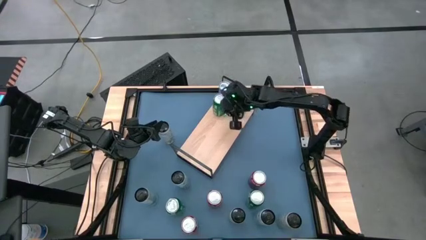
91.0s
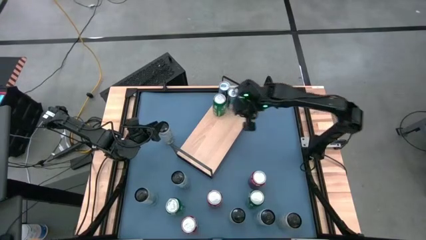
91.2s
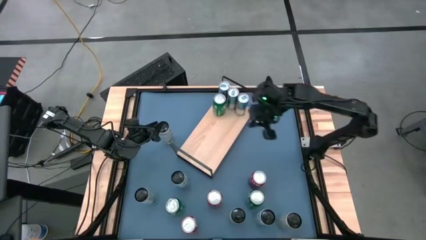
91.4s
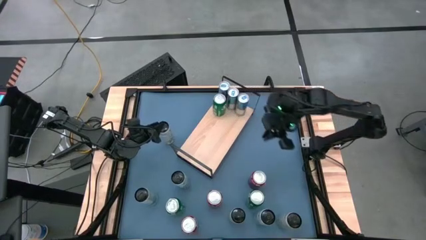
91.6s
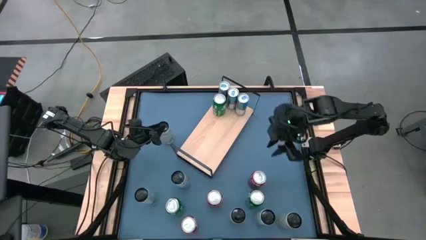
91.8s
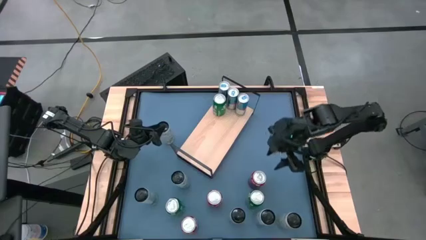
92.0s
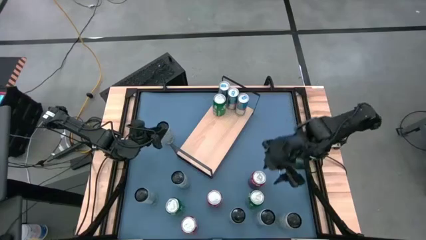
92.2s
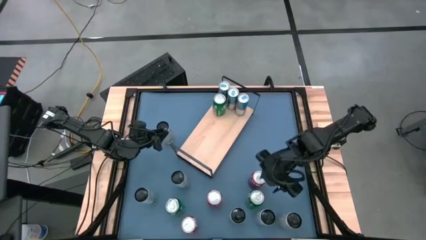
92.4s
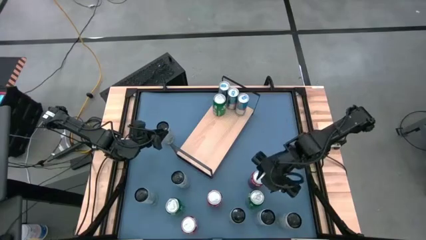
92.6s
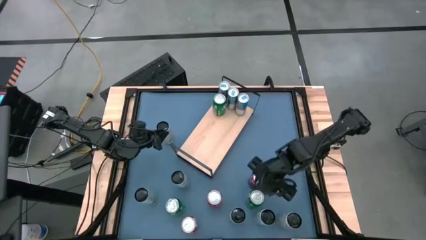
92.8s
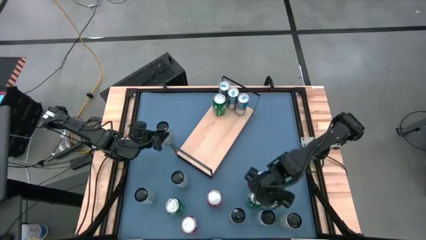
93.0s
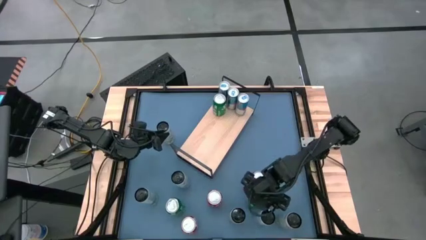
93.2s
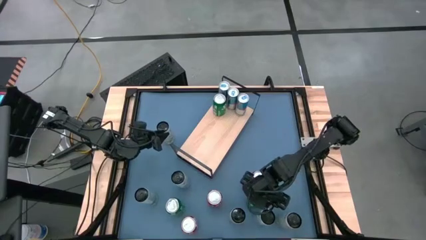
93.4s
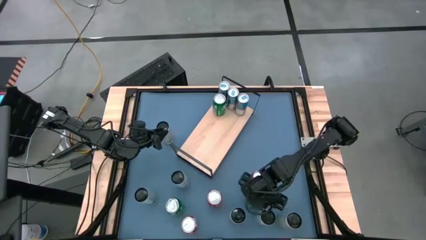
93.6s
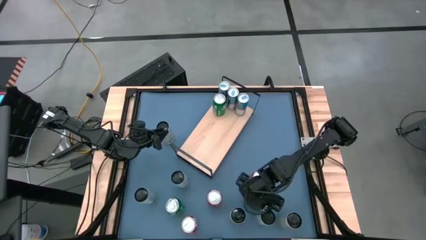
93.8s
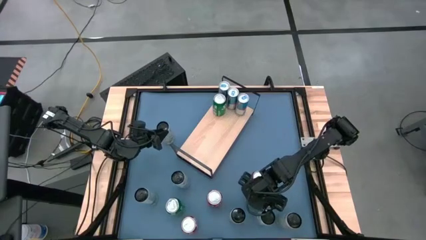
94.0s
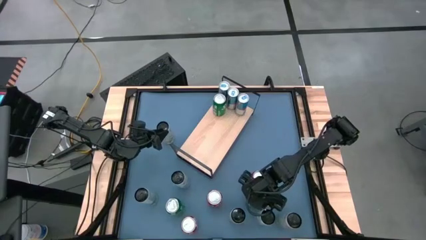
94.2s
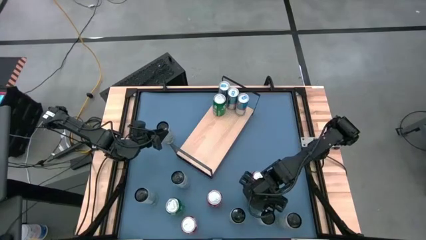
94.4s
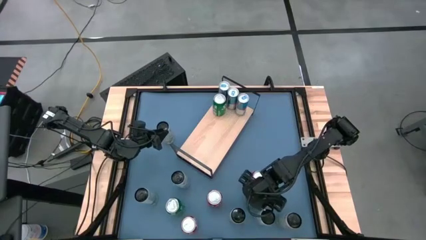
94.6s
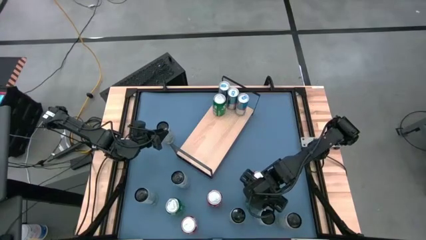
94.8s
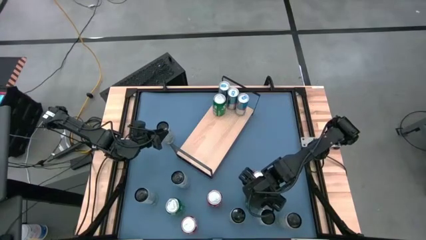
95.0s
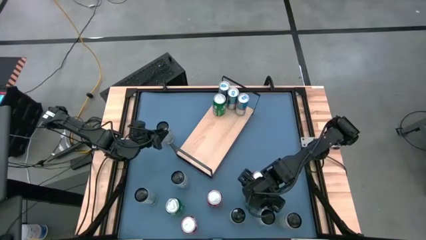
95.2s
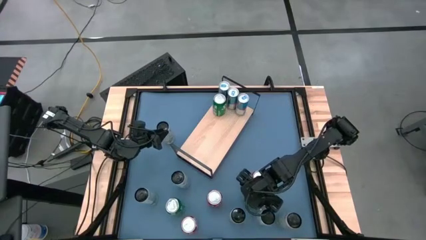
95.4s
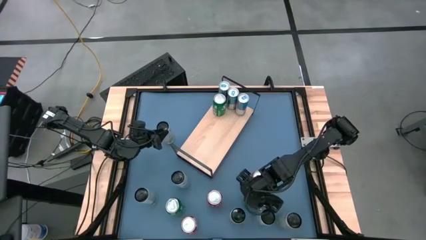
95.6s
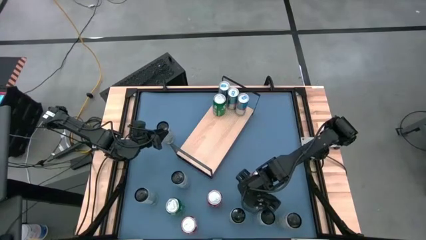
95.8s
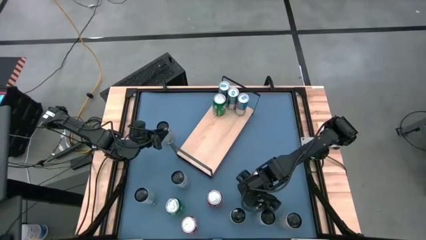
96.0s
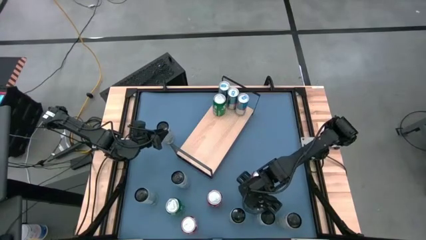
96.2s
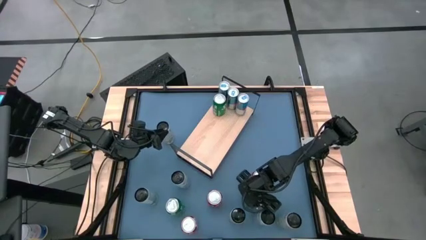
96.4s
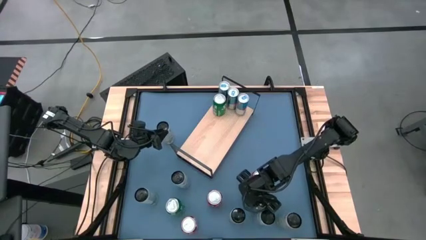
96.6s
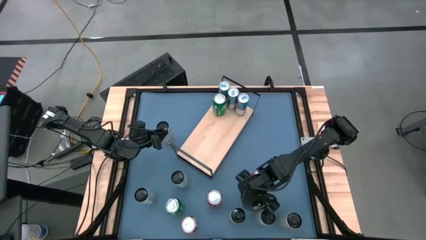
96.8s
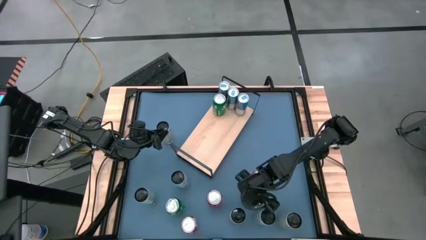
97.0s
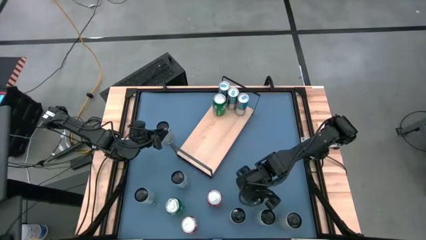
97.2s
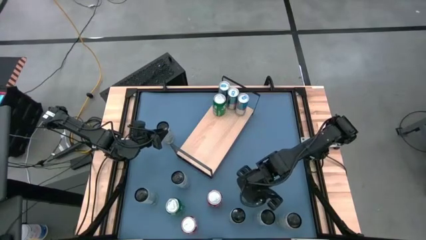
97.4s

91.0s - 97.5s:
Task: Place canned beverage on shelf
Put right green soda can on the shelf aligned with the other green soda can

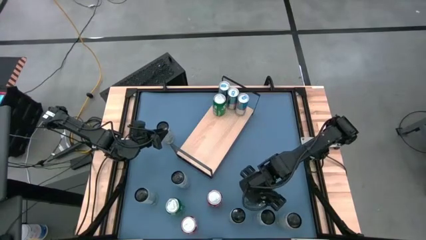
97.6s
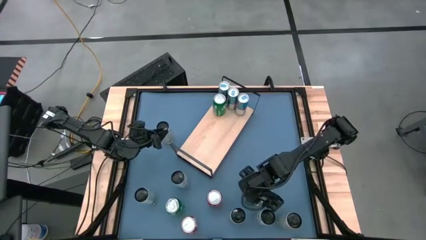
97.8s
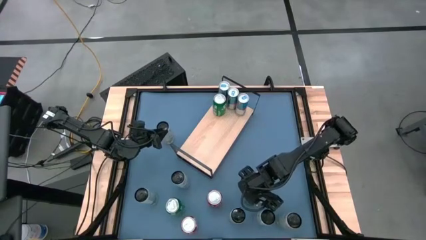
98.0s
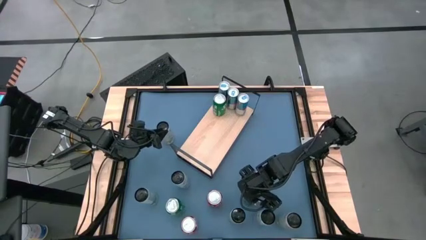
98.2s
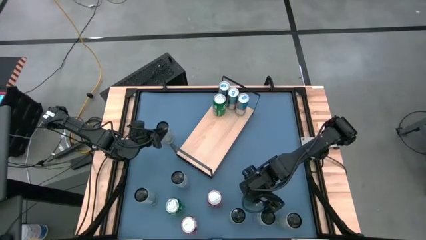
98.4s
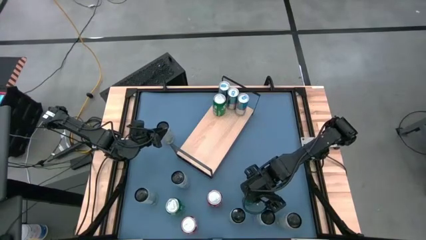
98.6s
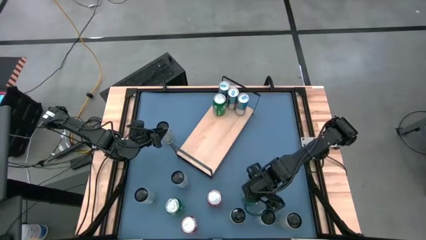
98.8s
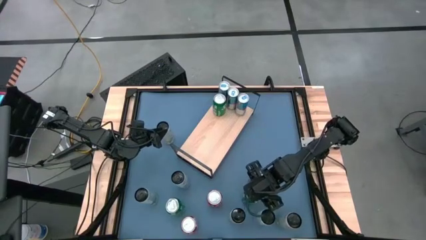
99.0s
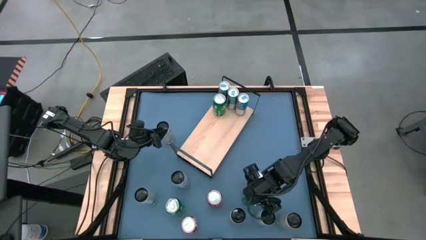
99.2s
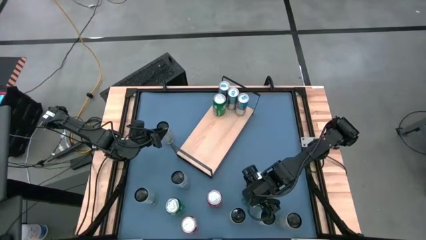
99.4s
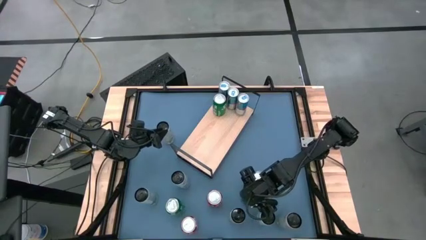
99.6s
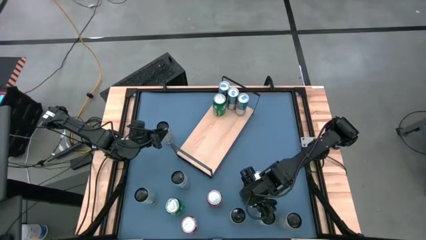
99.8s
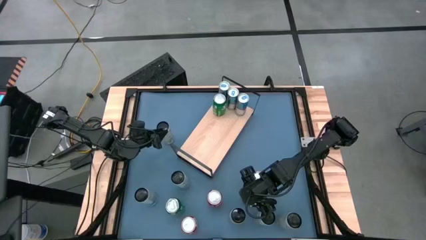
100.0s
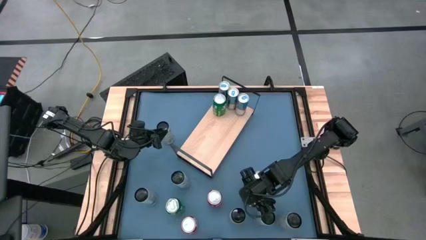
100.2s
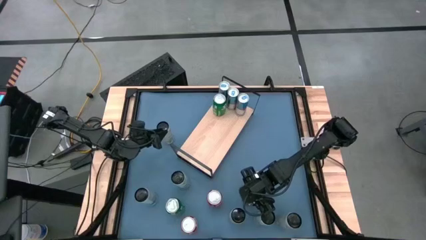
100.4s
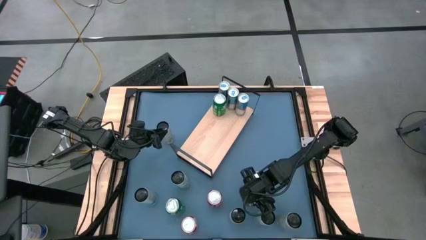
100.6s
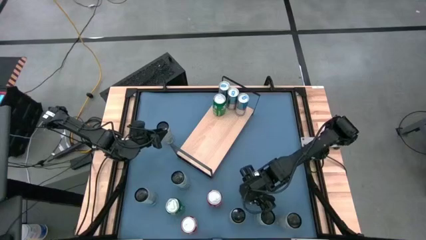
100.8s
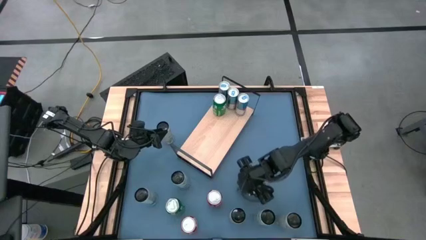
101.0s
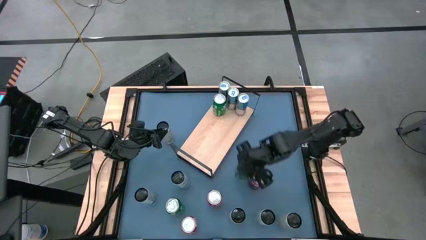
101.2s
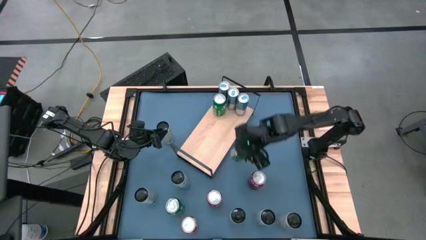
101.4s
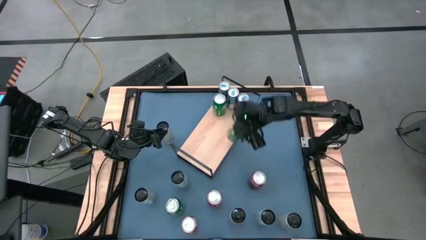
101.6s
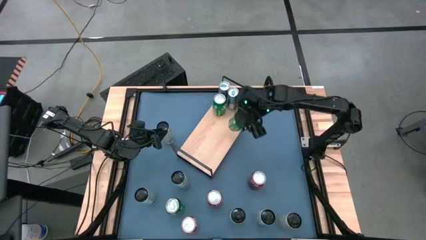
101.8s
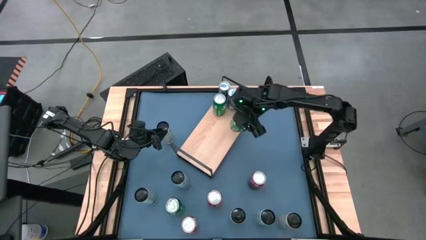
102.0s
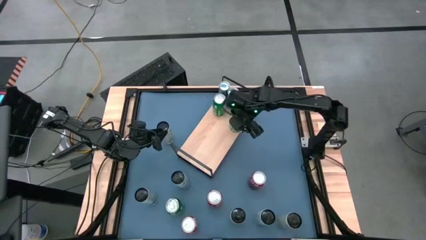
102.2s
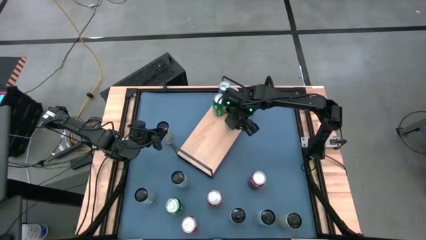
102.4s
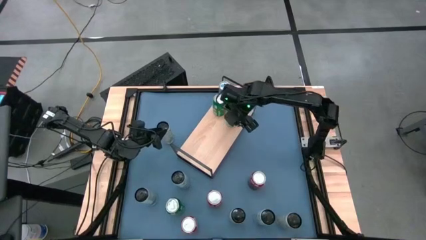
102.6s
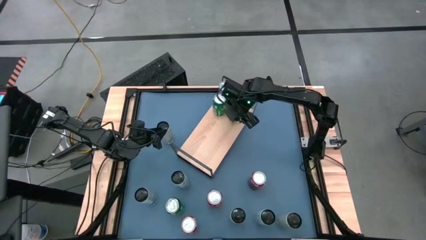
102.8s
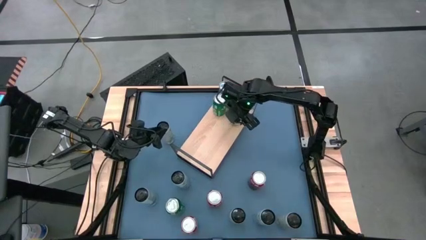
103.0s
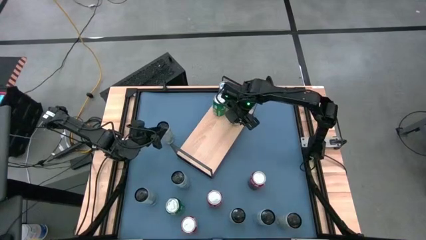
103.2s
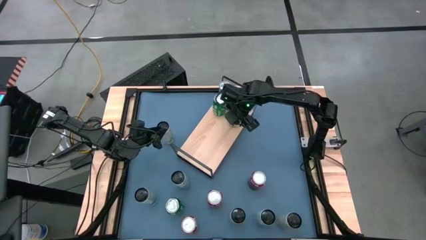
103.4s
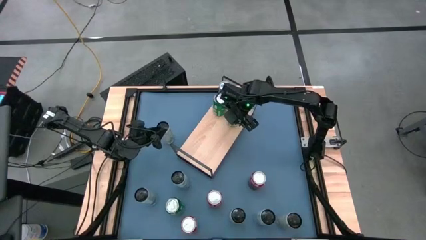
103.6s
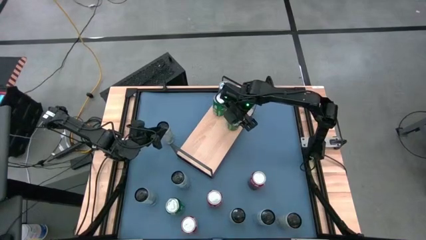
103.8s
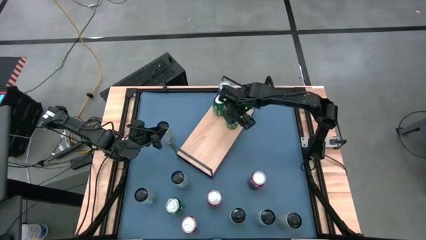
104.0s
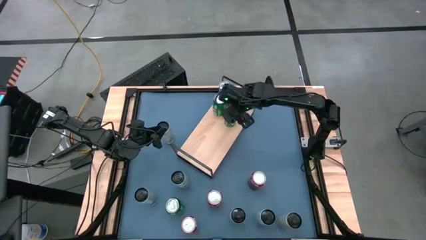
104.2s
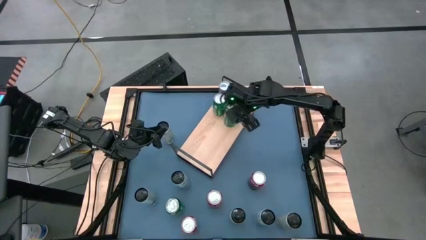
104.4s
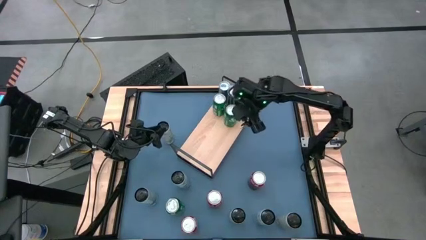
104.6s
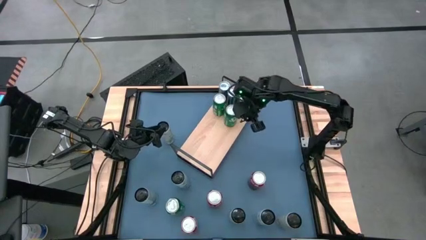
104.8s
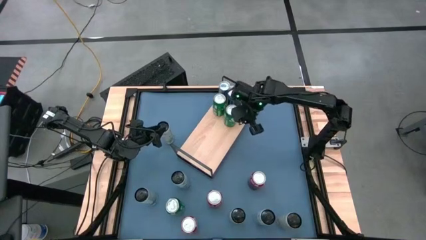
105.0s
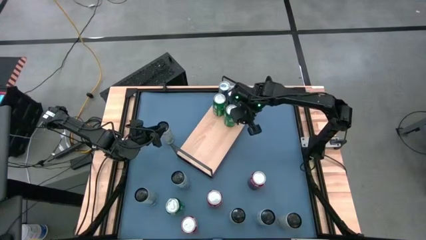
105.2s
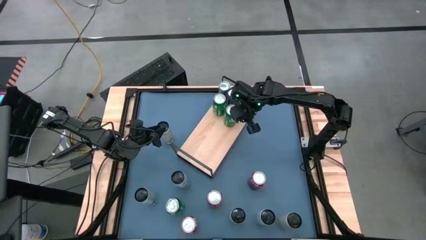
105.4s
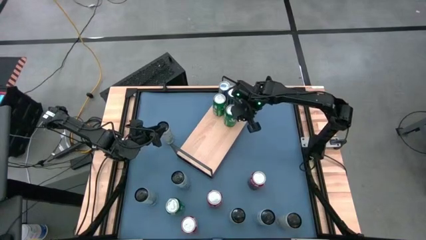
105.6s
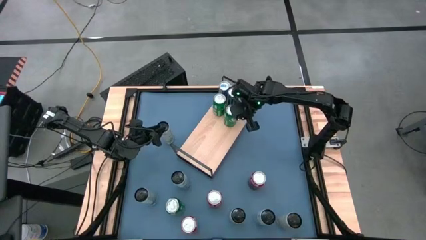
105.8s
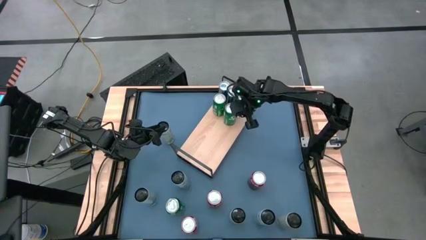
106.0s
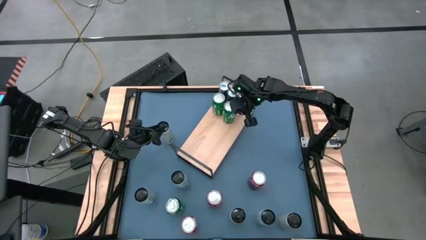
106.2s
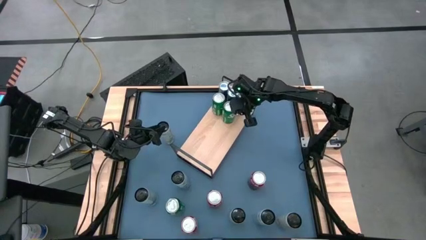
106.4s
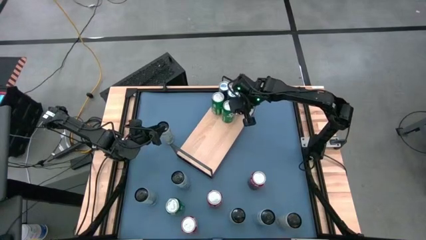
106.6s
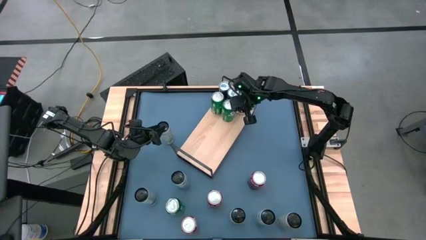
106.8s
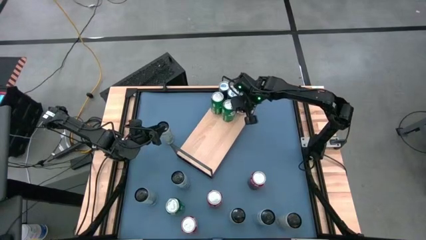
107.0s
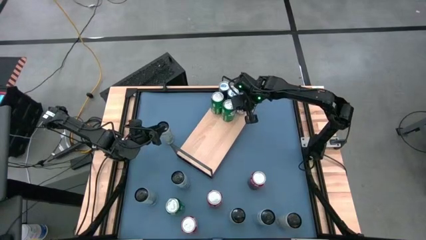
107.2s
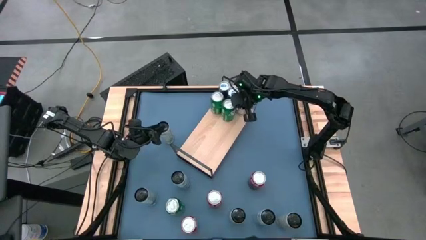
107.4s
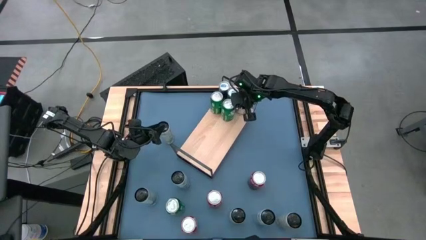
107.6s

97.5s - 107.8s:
Put right green soda can on the shelf aligned with the other green soda can
